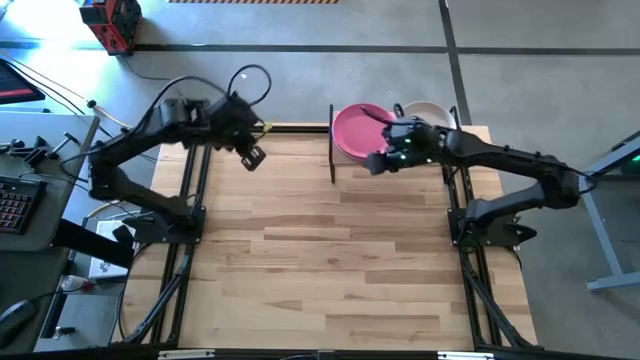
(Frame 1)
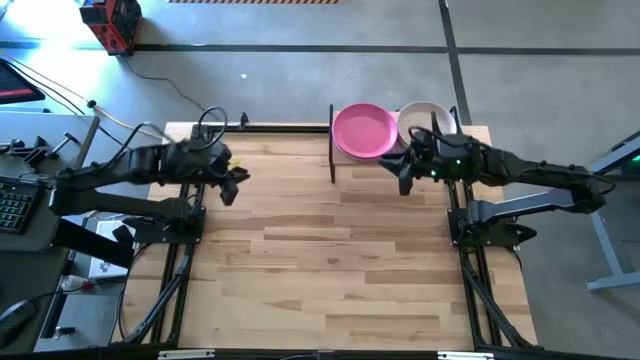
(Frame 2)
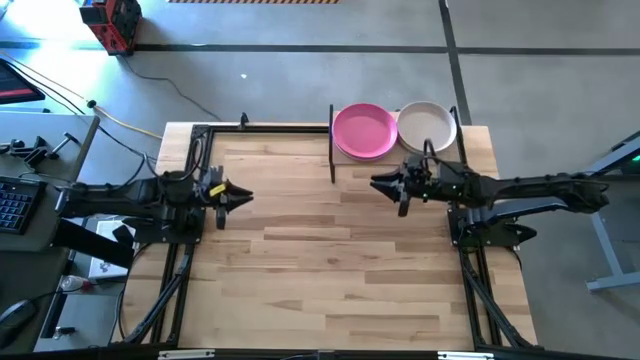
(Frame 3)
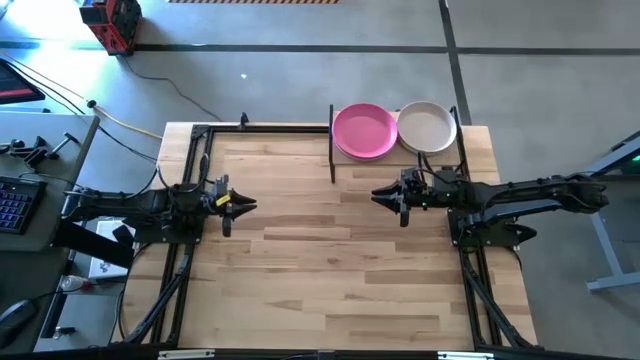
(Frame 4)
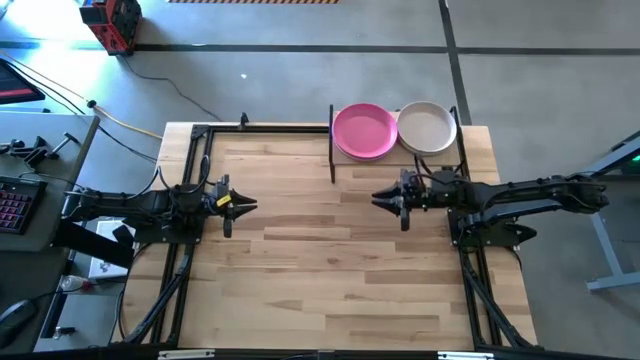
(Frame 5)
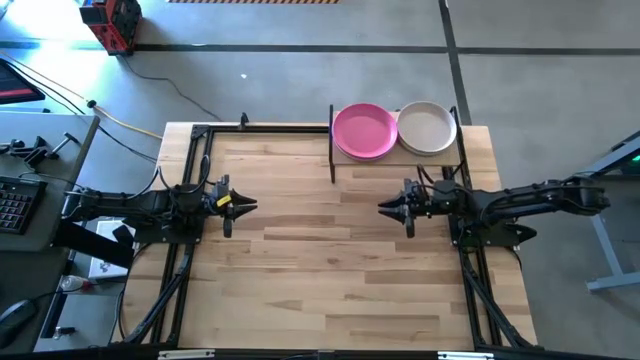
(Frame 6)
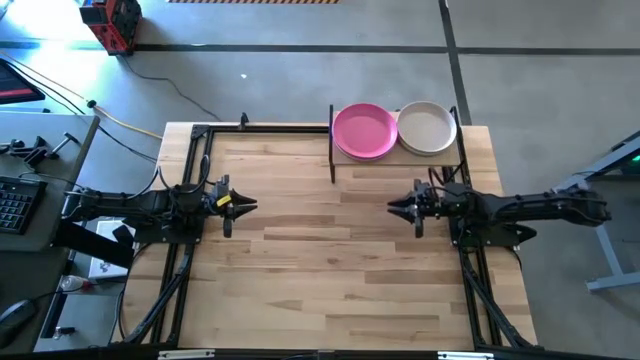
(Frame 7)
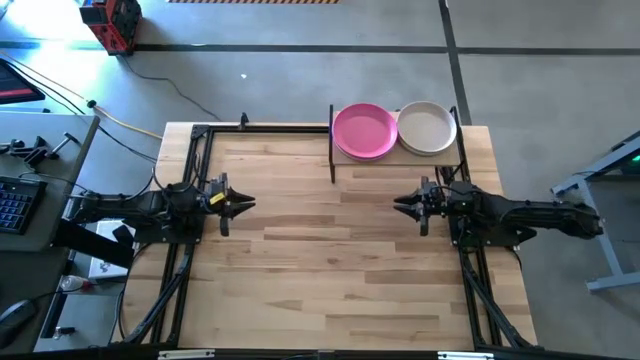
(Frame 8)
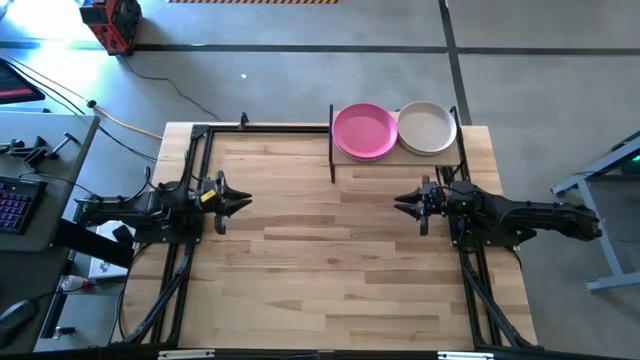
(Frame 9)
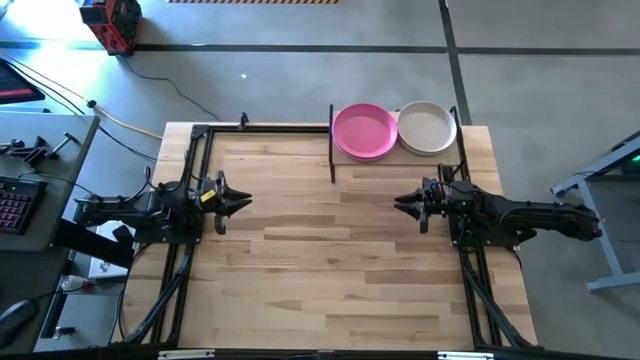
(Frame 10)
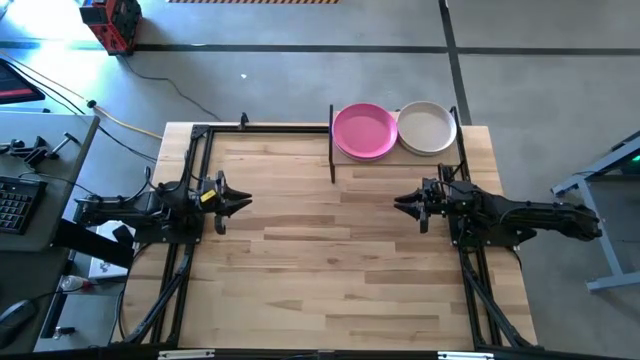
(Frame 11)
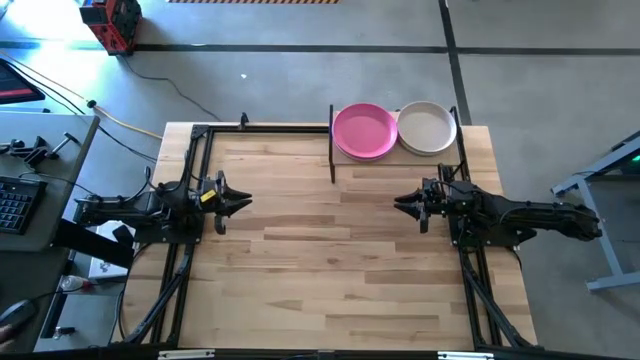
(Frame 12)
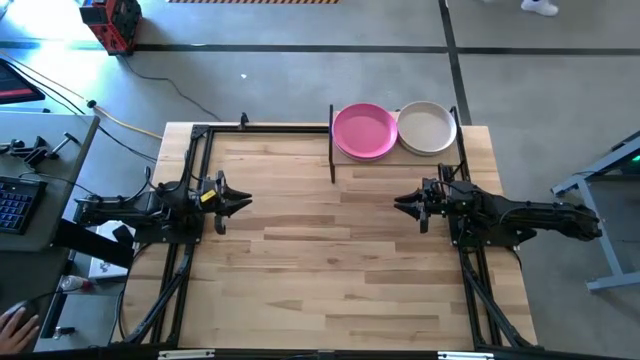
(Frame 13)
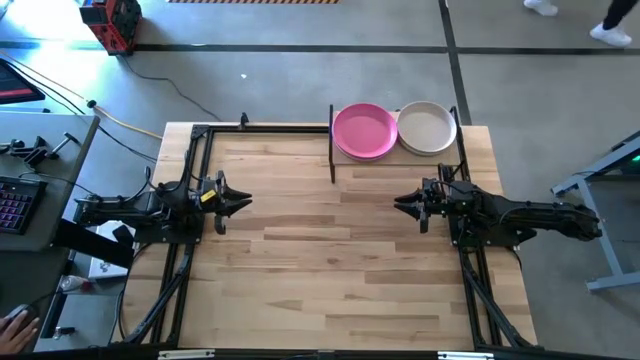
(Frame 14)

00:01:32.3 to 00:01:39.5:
Task: Place and stack plates onto a shelf
Return to Home Position

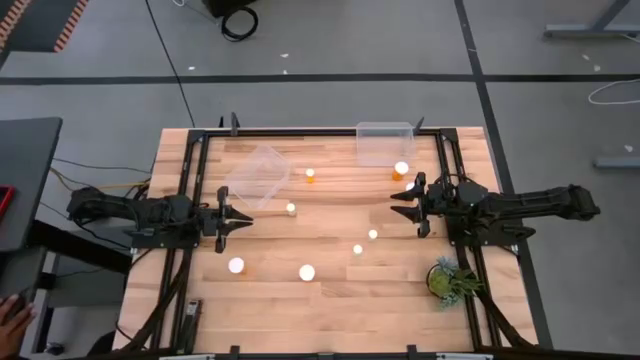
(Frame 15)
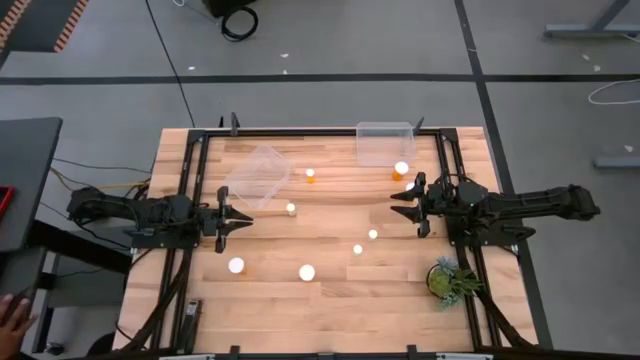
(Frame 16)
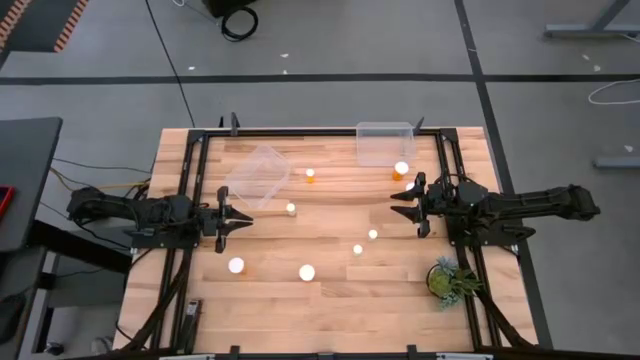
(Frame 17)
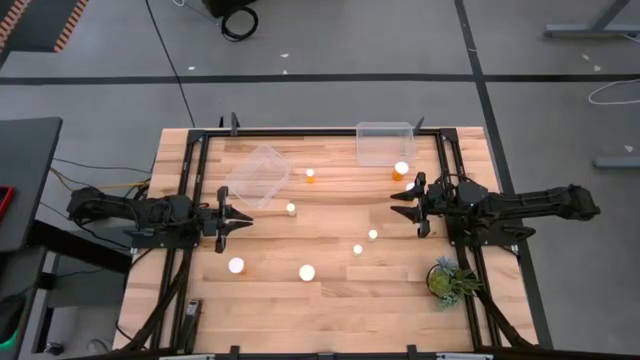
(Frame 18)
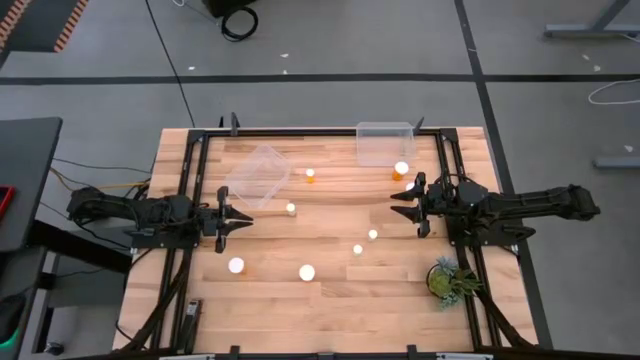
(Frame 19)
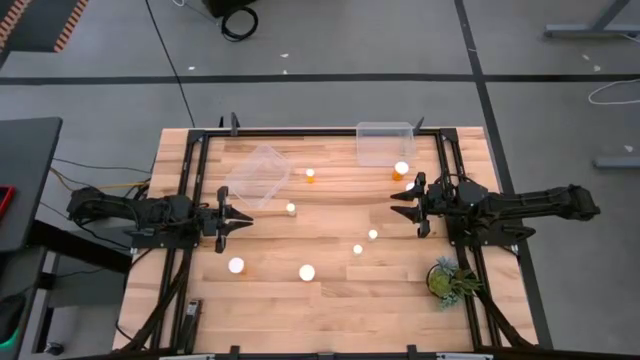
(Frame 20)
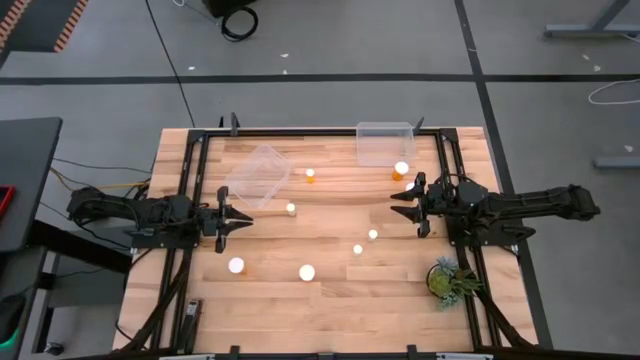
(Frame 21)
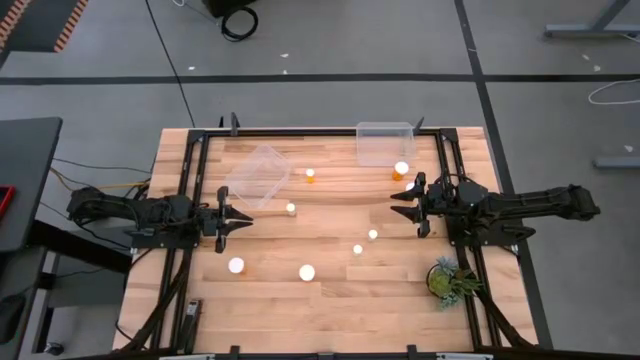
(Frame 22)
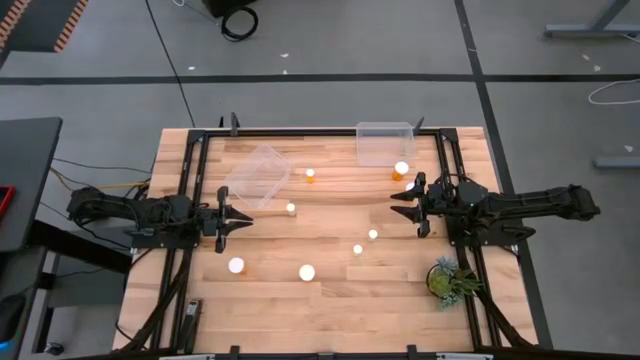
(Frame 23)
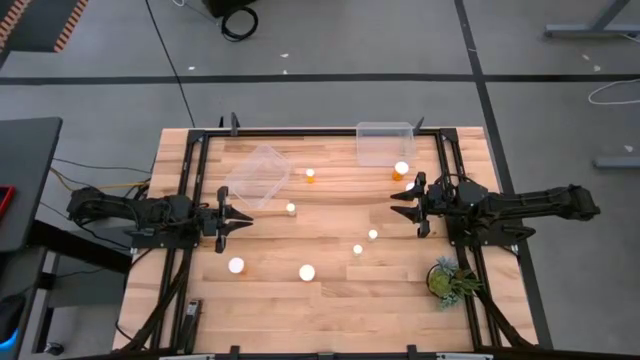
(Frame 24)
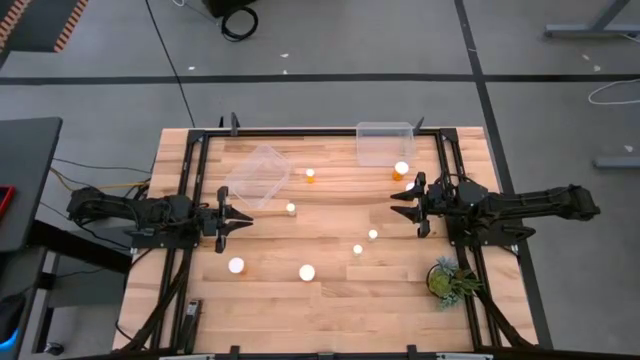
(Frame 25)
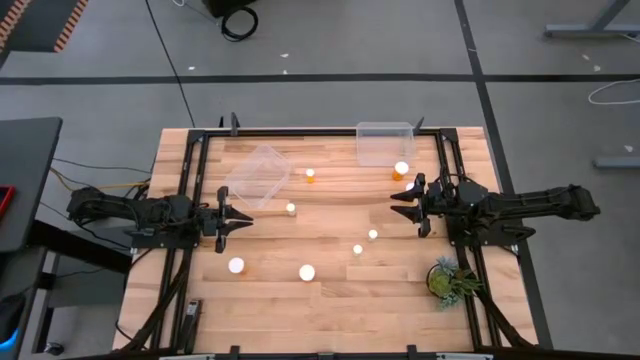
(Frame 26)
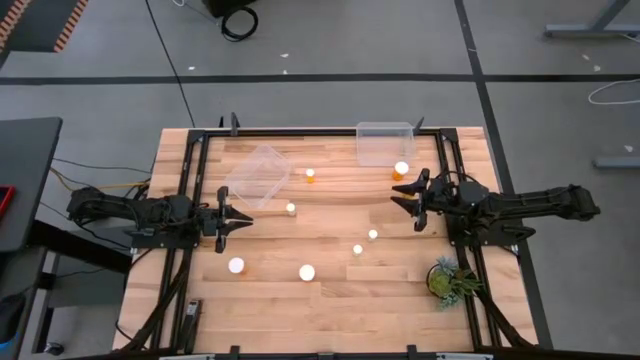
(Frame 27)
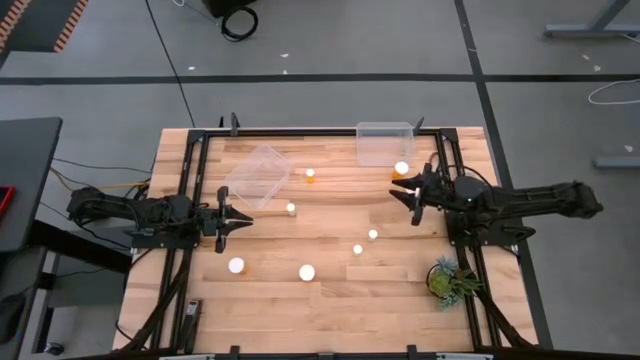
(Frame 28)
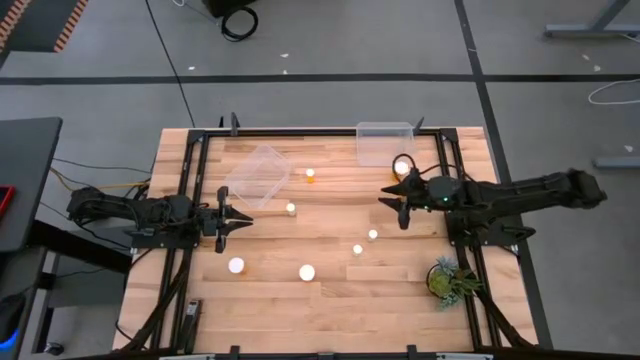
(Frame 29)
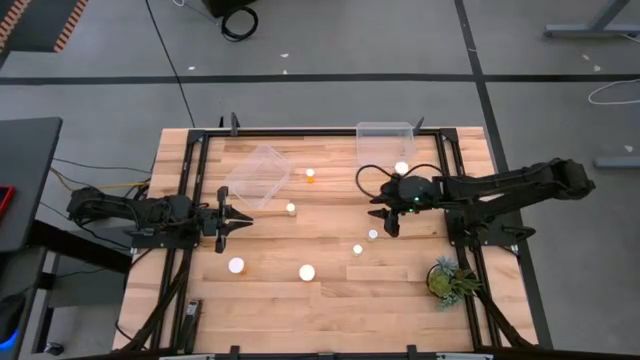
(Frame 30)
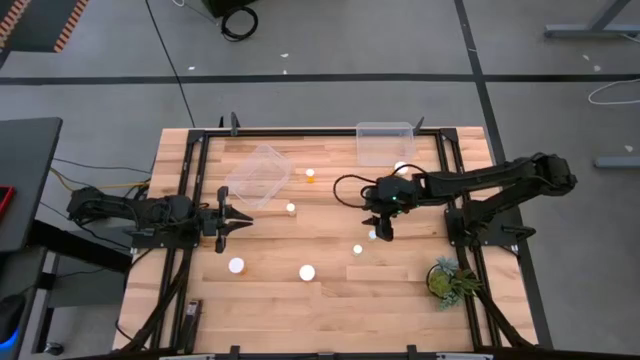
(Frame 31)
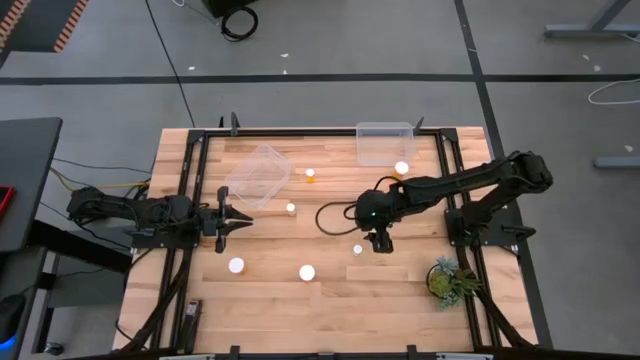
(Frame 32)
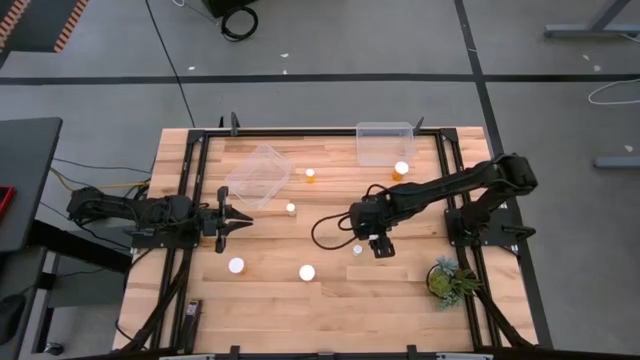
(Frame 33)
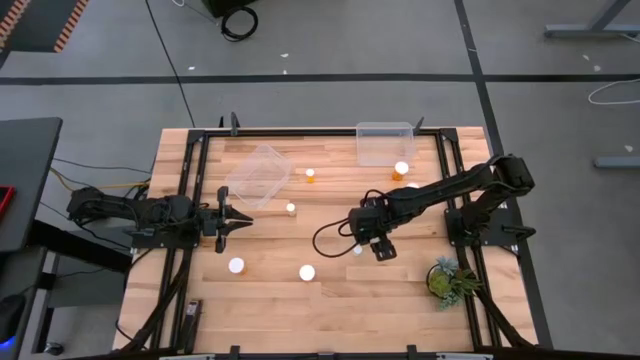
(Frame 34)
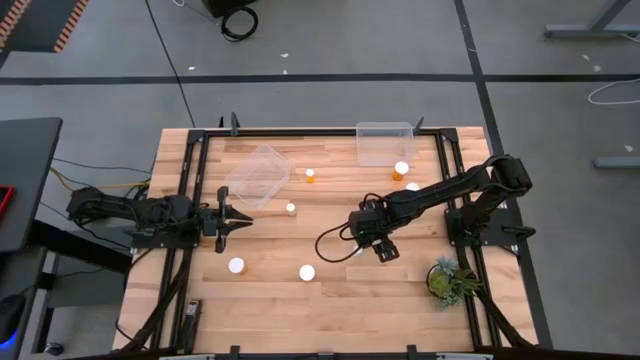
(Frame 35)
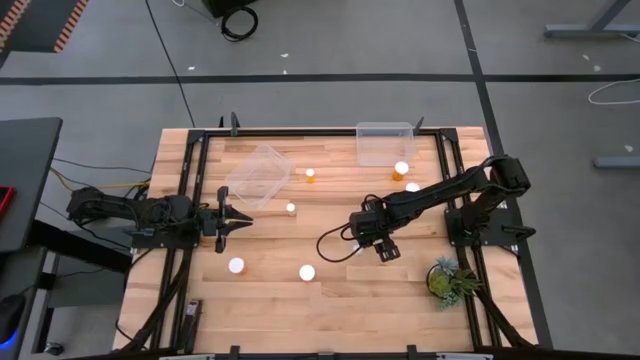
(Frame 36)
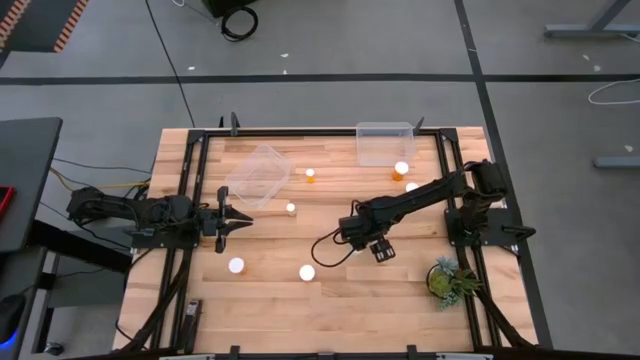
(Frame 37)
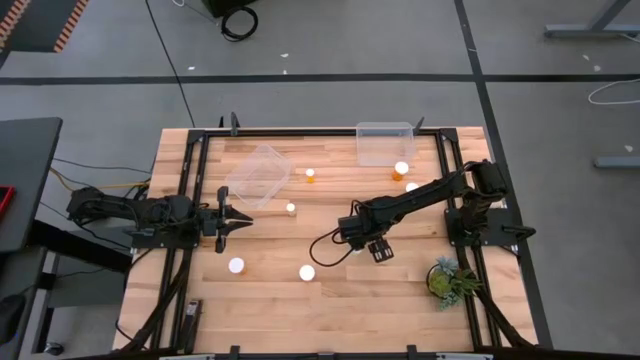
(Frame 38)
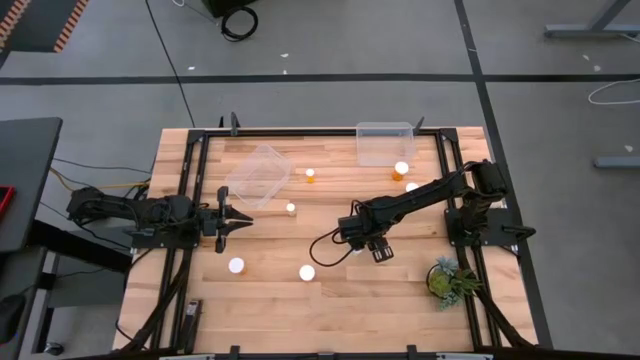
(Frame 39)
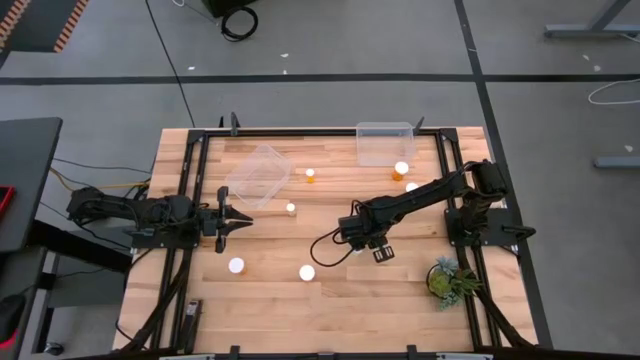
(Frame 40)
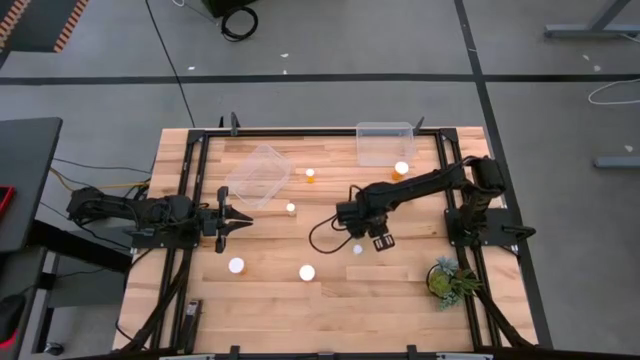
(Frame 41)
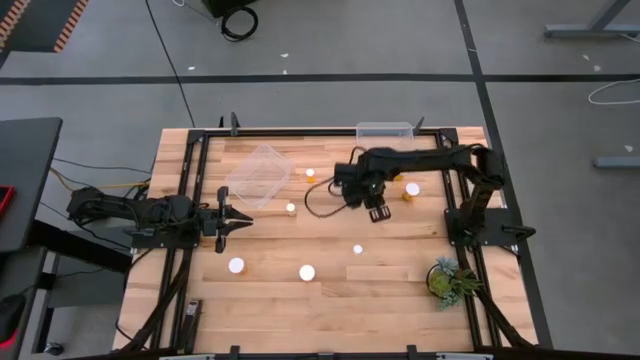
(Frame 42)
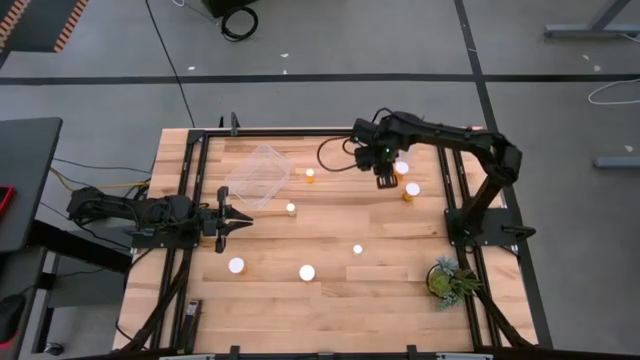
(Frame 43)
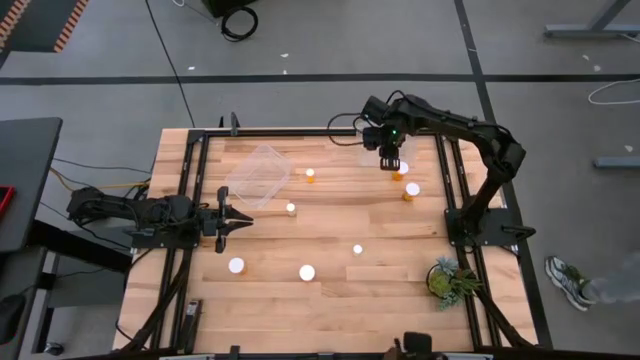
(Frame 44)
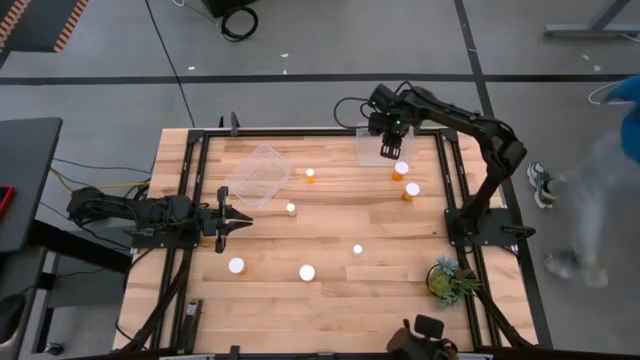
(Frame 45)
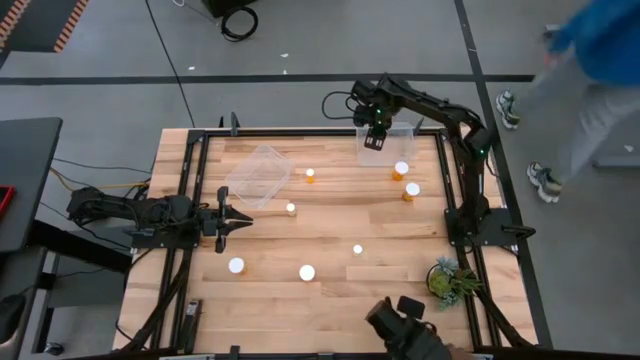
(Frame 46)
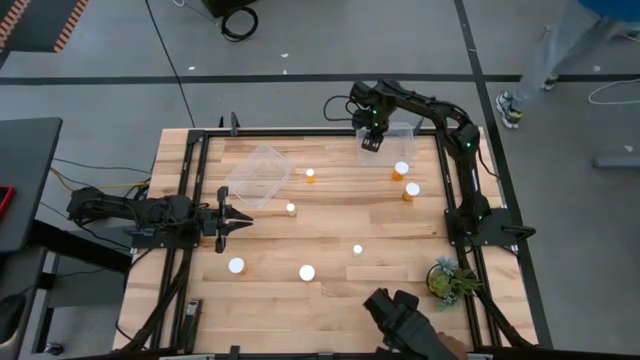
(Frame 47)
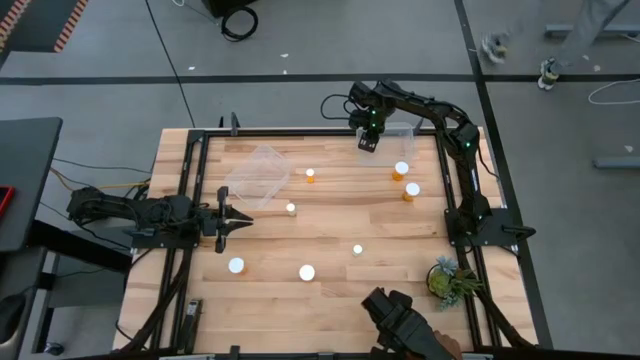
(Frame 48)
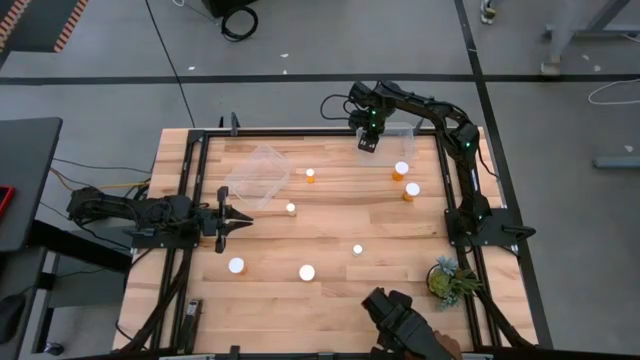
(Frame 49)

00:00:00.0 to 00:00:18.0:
Task: Pick and place medicine bottles into bin by pill shape (circle, oval)
Put the right slim yellow pill bottle into the right transparent bin
